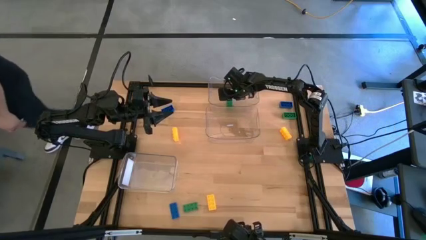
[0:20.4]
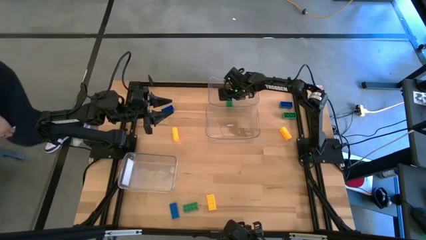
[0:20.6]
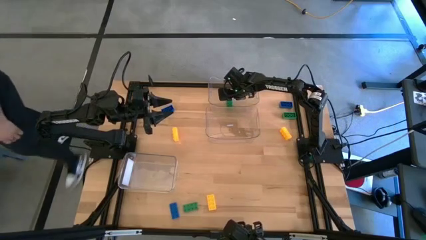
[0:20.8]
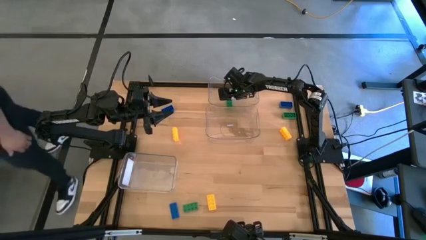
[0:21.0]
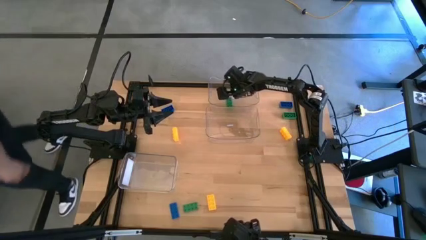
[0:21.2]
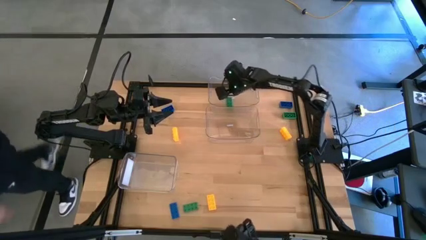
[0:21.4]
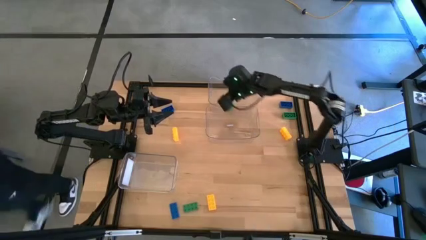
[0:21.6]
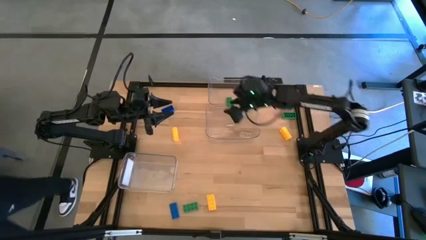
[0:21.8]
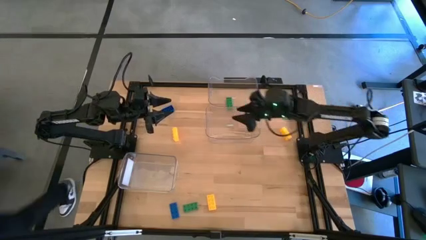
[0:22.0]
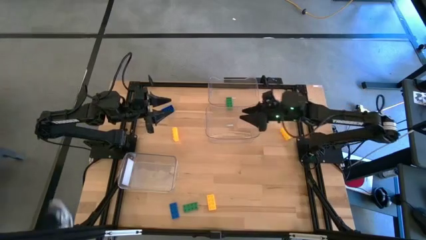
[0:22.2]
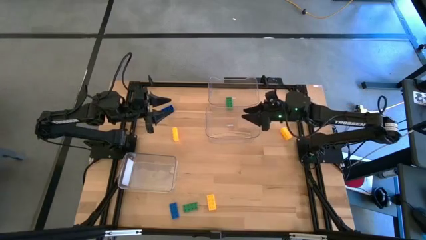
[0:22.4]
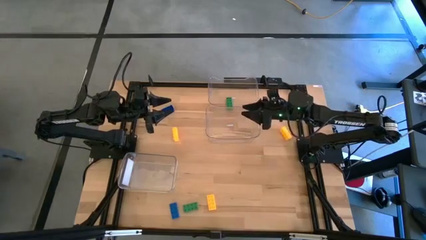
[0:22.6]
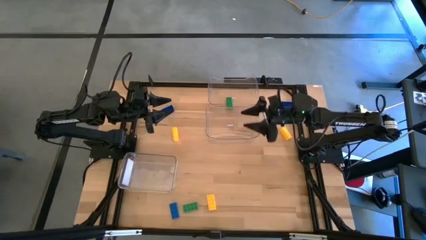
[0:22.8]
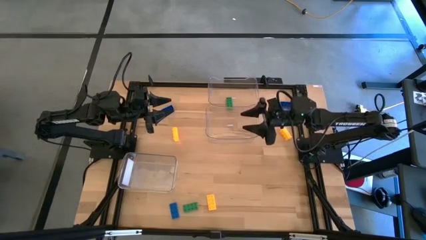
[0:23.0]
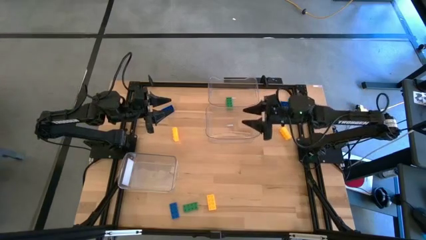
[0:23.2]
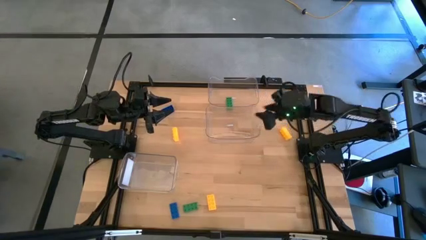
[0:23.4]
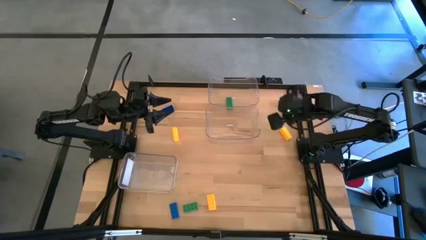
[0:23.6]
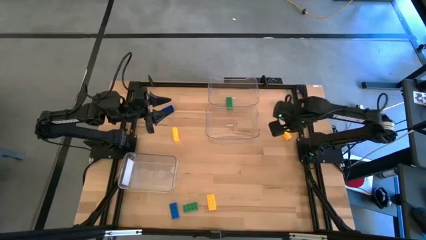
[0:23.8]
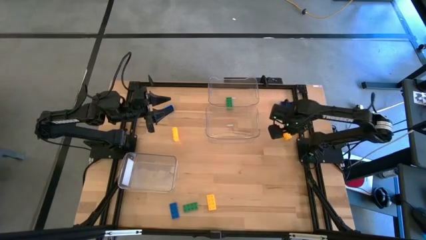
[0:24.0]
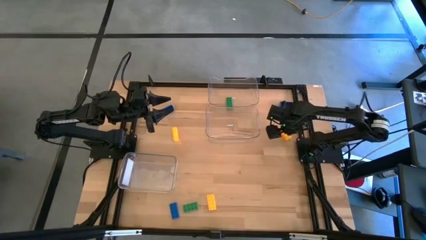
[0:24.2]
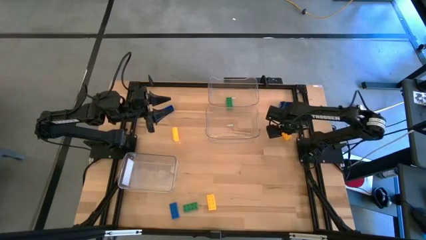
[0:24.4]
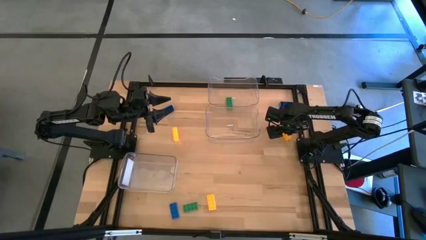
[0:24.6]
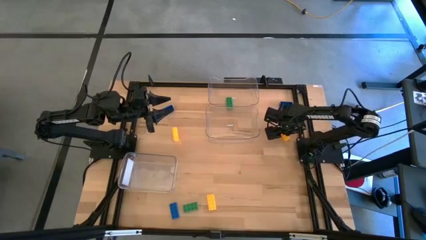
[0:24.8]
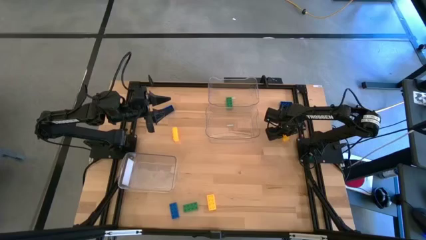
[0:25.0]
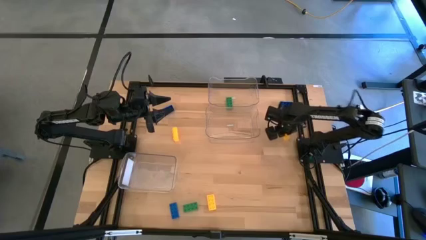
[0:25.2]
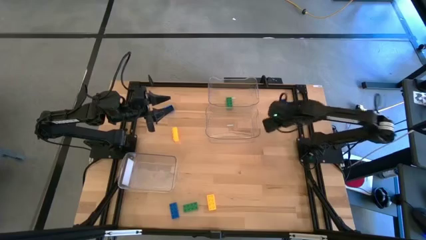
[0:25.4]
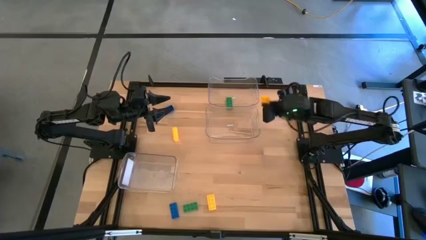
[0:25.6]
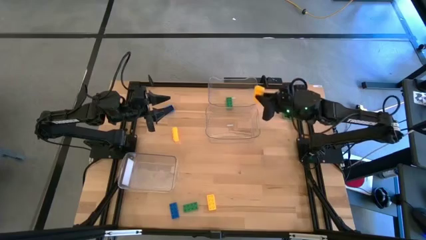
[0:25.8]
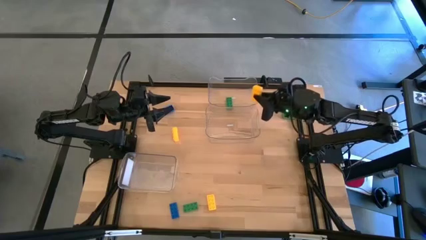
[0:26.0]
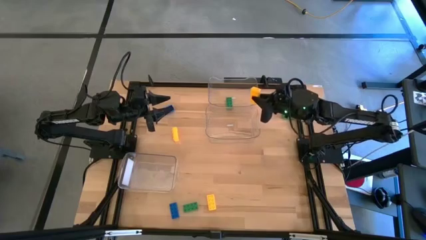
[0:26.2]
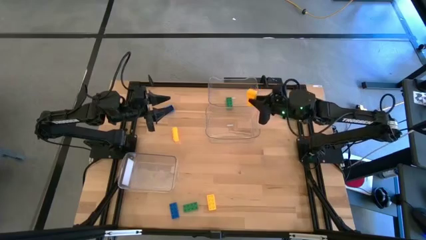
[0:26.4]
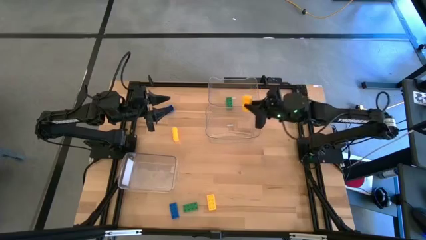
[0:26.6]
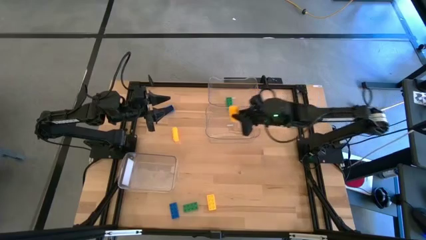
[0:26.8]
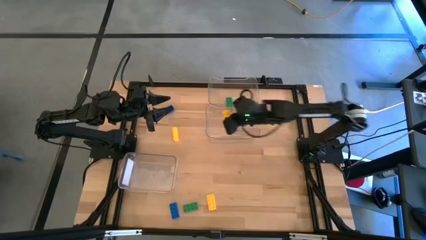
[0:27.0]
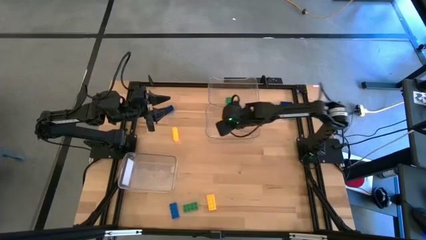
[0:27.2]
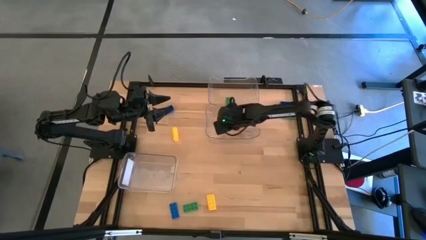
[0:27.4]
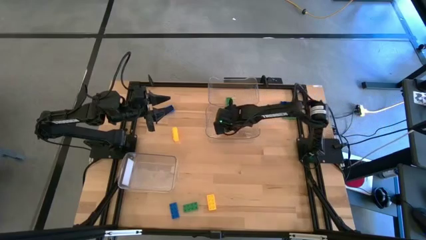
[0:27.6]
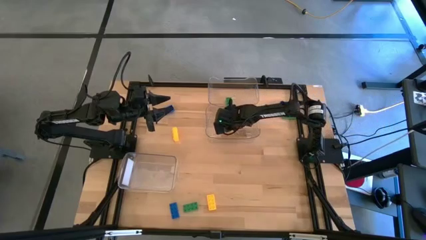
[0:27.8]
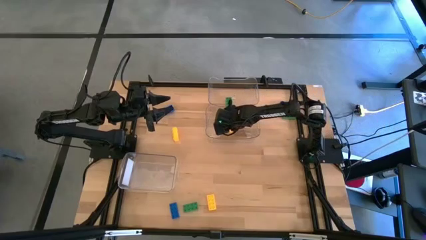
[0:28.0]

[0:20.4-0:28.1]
Task: Sort & place blocks by color
Put the top right yellow game piece into the center transparent bin

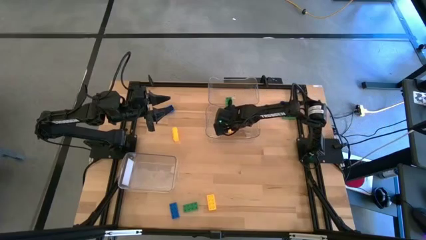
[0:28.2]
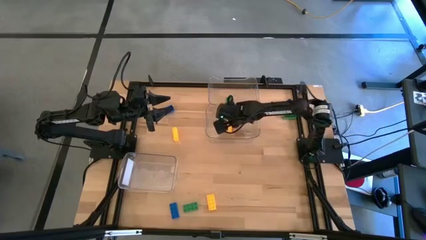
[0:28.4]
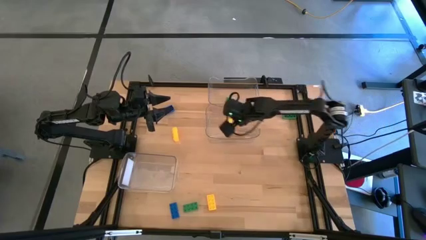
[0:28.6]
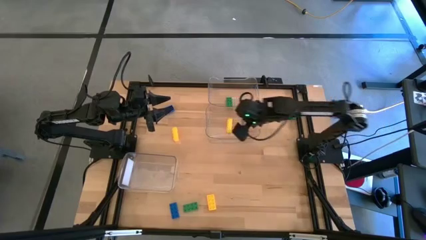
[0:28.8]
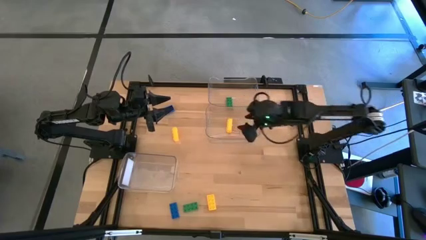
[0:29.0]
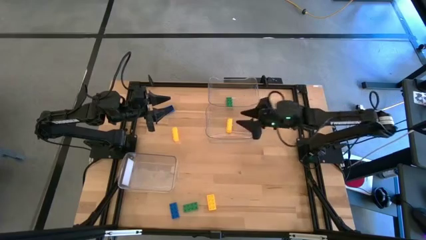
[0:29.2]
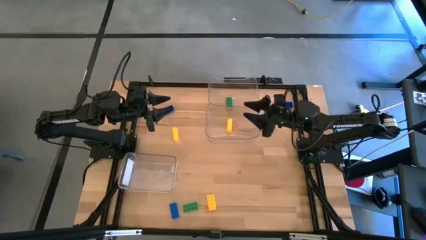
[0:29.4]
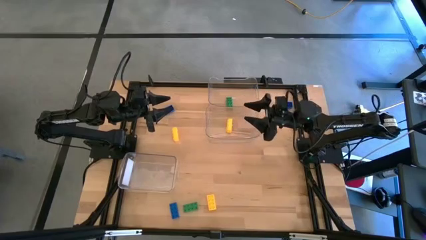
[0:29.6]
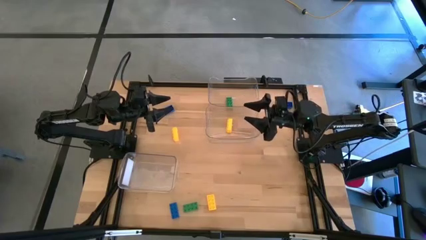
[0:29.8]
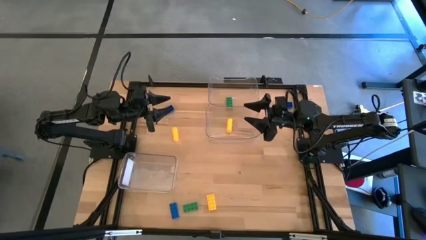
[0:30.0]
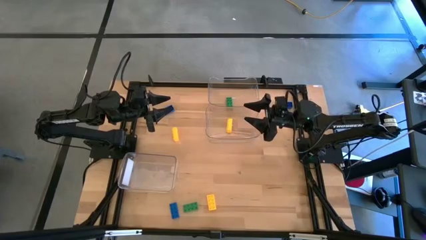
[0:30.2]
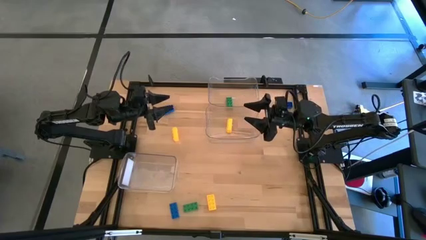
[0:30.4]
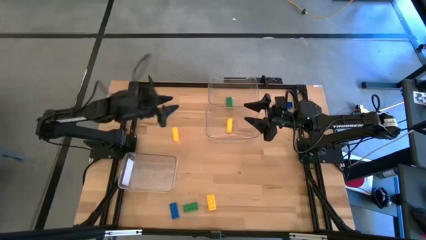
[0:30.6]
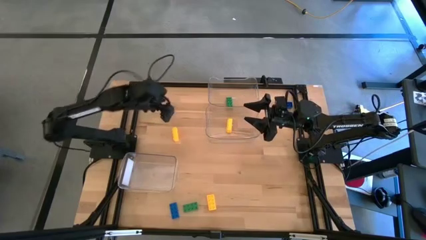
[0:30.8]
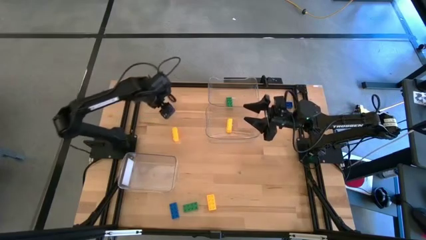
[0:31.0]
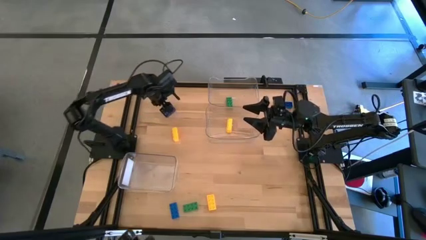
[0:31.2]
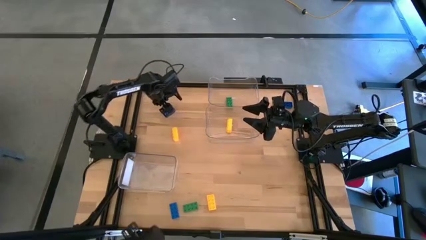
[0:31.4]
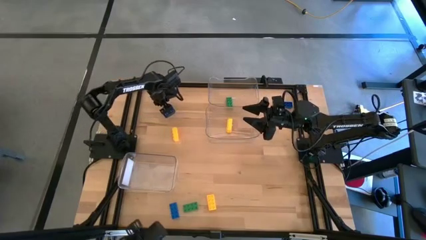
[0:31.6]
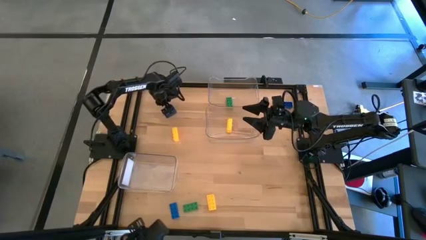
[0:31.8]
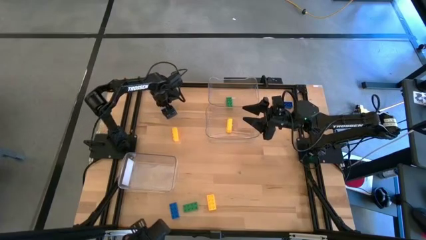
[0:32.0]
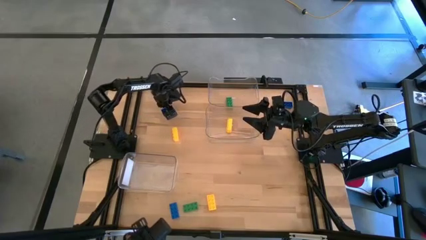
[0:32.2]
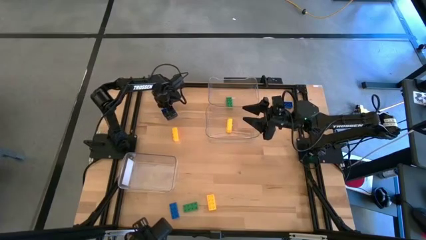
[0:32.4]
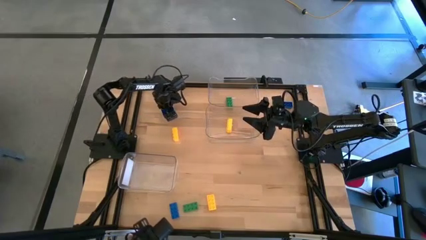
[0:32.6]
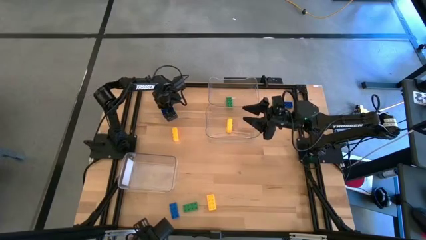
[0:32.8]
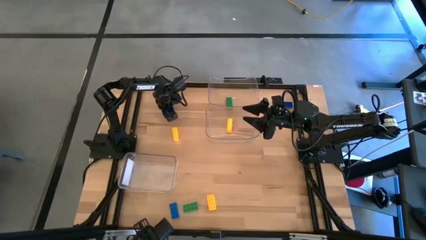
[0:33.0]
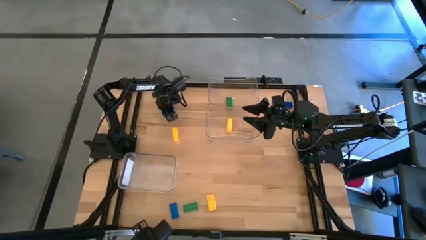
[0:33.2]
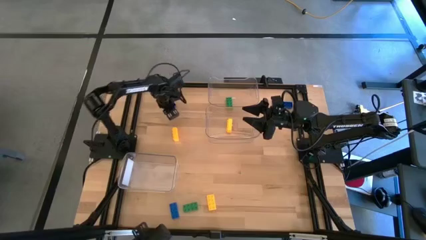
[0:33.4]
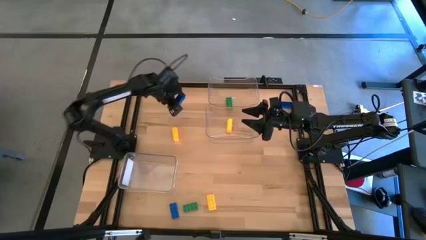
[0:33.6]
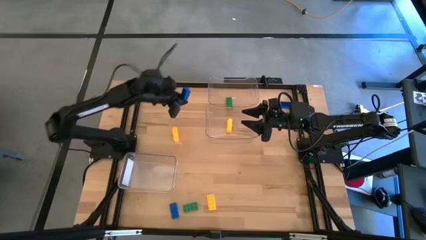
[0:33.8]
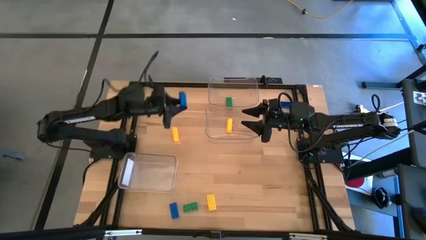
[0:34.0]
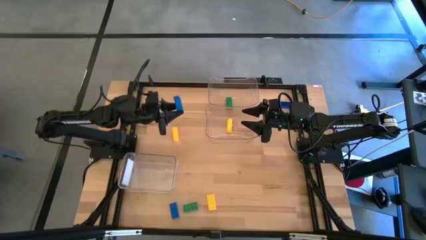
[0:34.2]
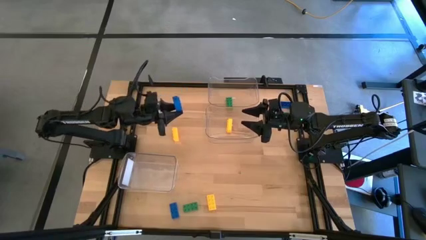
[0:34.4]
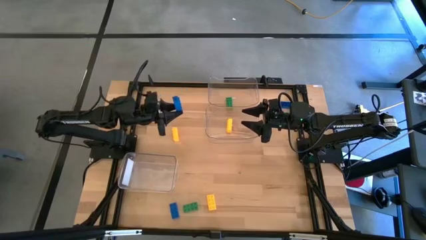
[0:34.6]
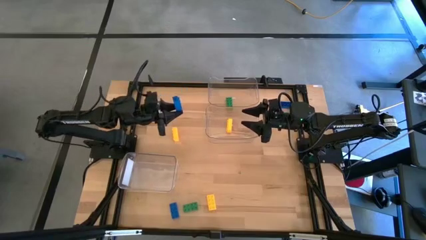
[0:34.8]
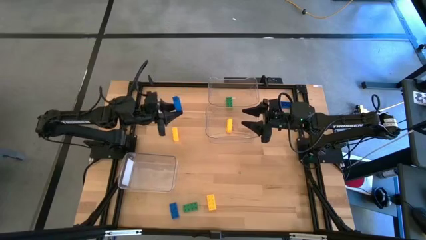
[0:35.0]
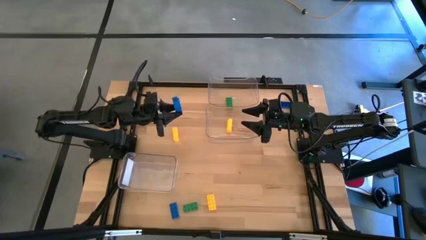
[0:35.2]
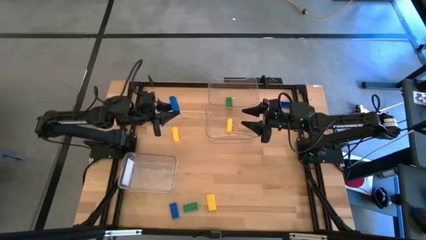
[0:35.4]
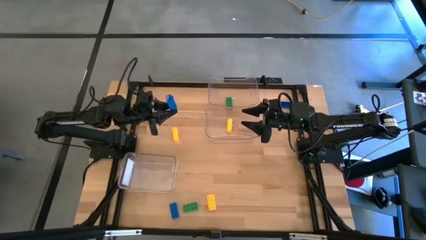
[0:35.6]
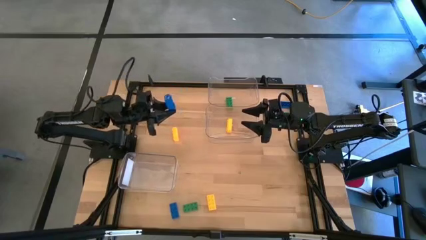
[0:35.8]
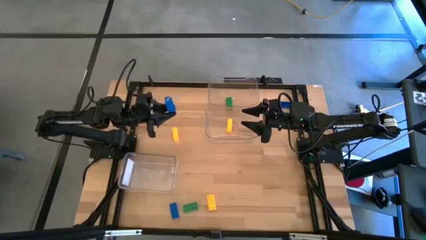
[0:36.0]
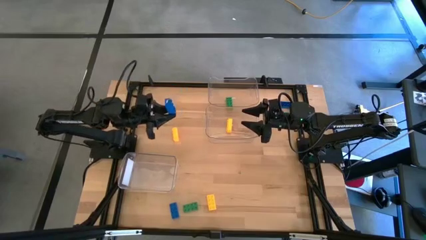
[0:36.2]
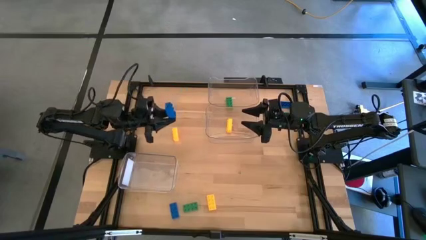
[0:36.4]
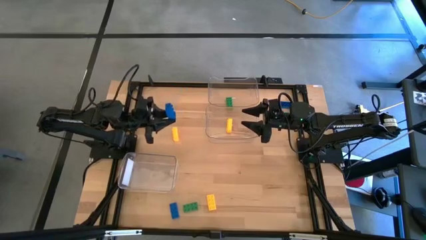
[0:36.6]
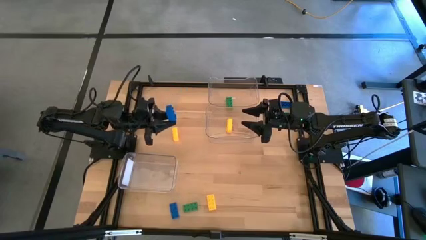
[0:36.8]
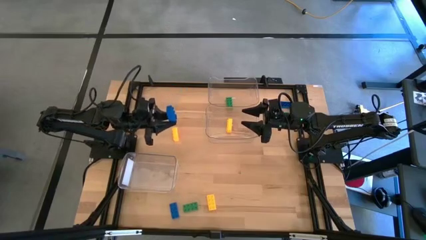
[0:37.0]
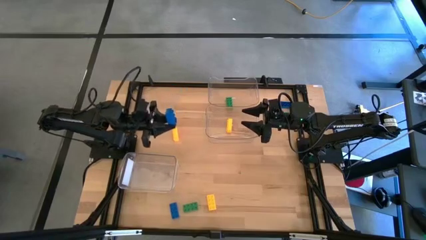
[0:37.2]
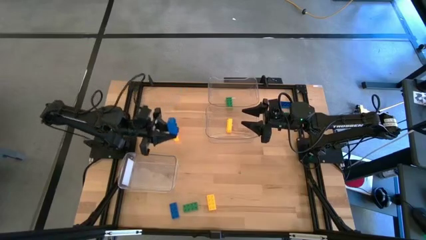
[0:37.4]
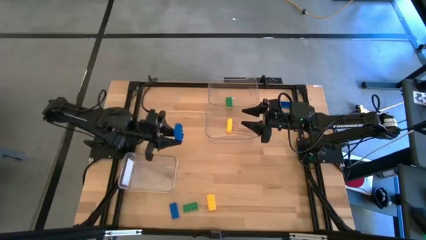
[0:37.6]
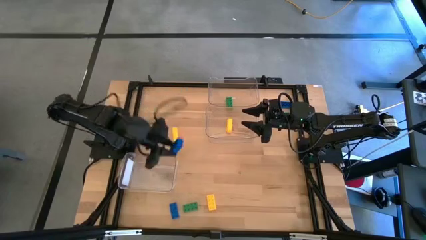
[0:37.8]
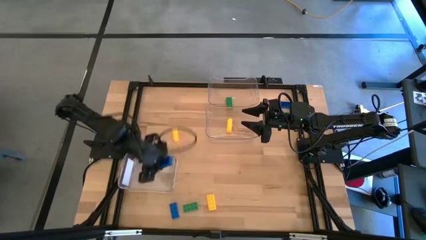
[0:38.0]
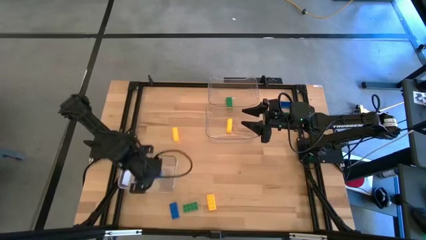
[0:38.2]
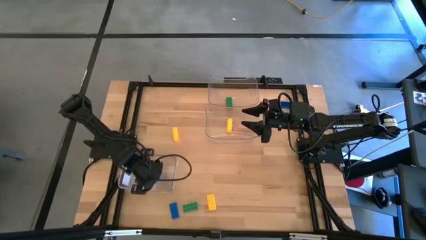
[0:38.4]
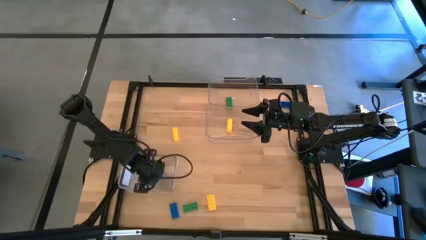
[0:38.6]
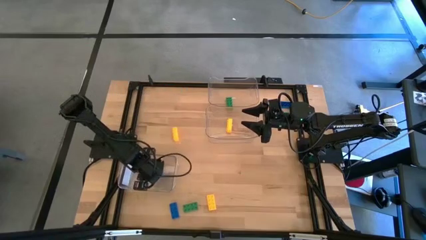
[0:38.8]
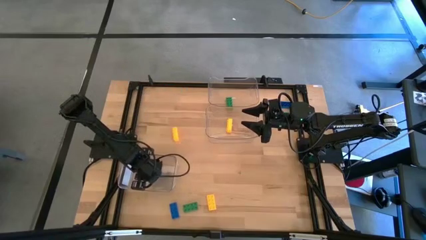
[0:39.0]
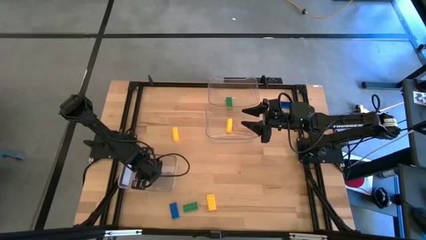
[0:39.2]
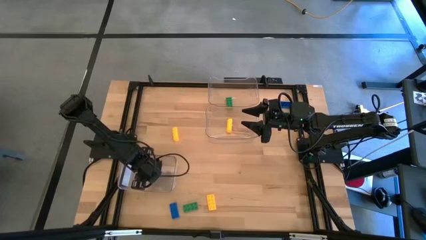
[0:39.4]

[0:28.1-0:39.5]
Put the top left blue game piece into the bottom bottom transparent bin
